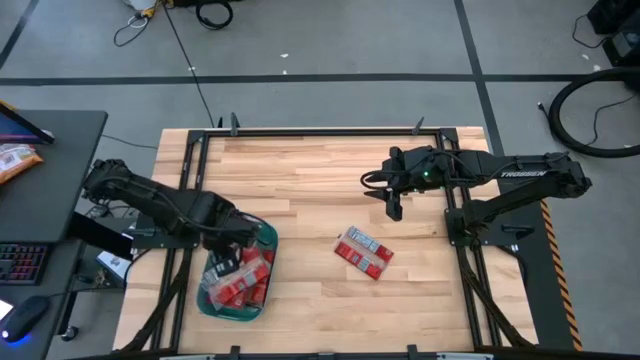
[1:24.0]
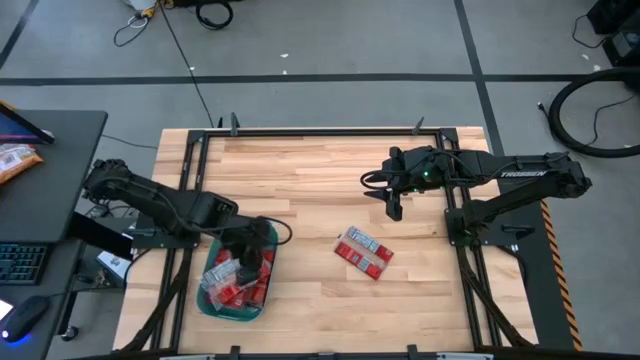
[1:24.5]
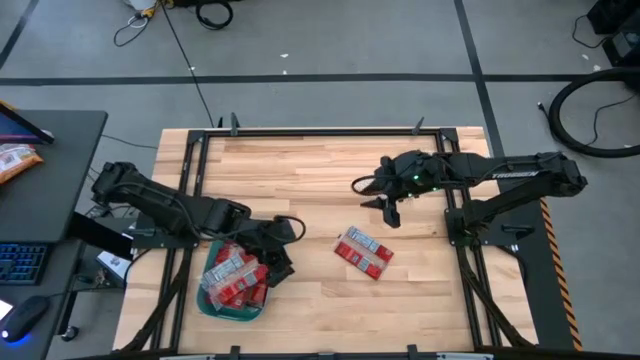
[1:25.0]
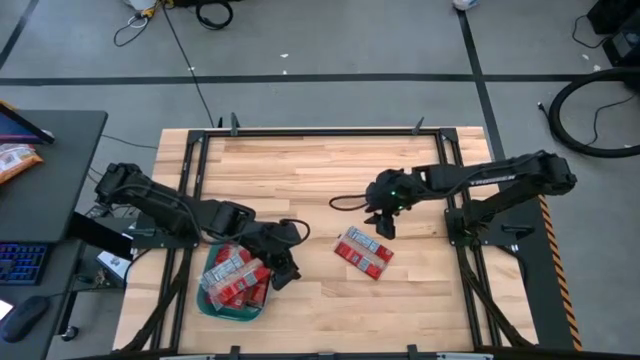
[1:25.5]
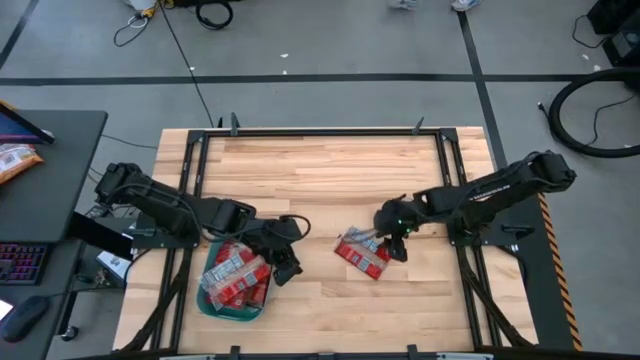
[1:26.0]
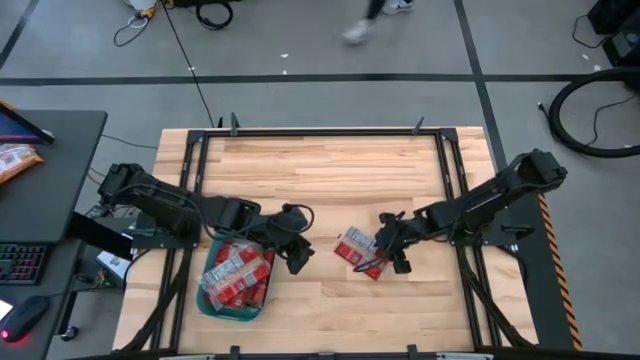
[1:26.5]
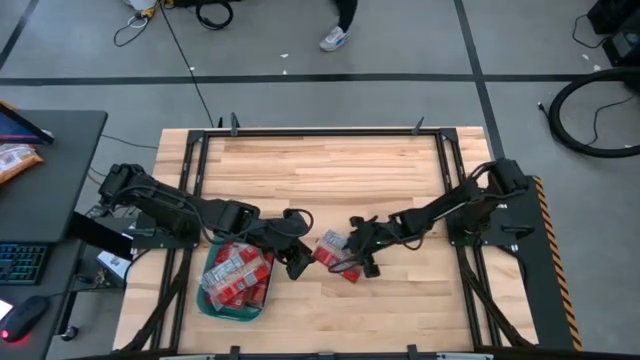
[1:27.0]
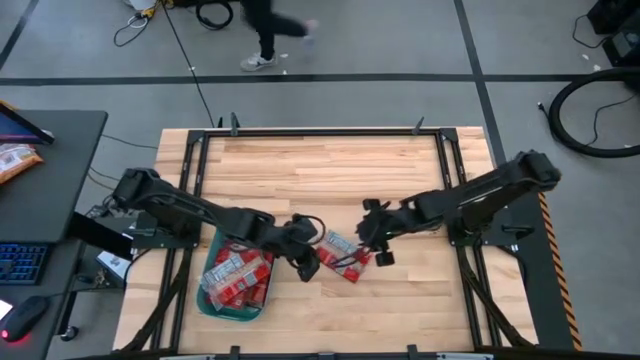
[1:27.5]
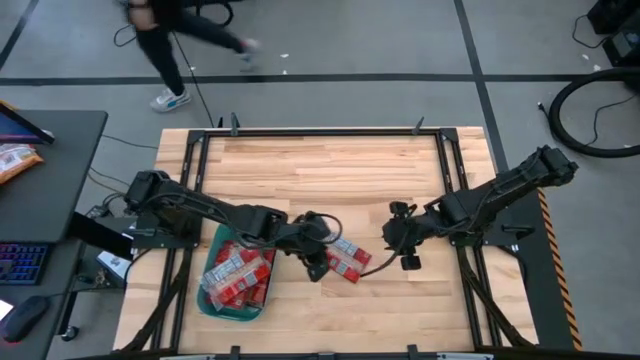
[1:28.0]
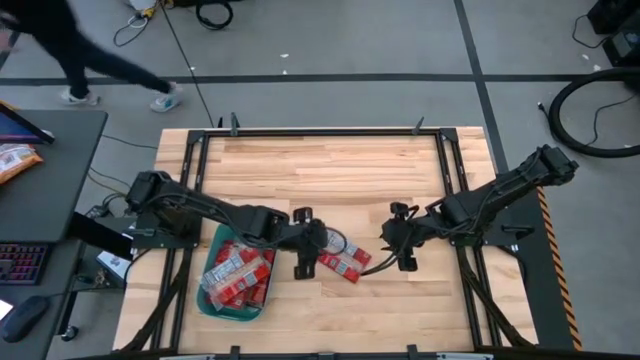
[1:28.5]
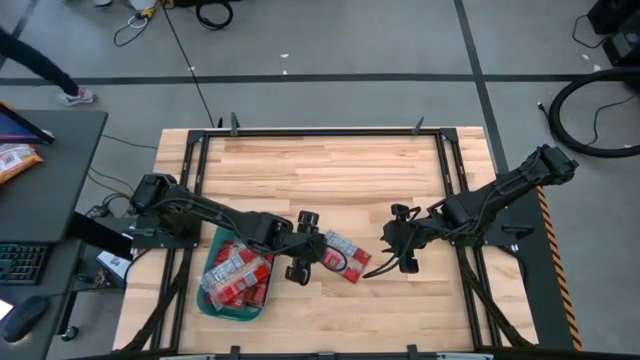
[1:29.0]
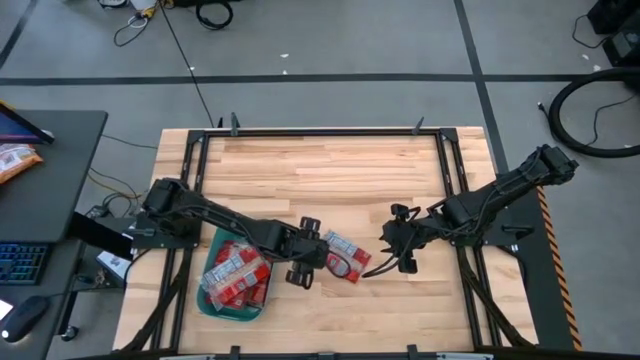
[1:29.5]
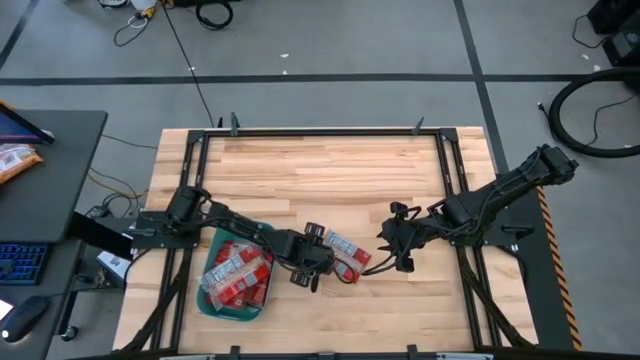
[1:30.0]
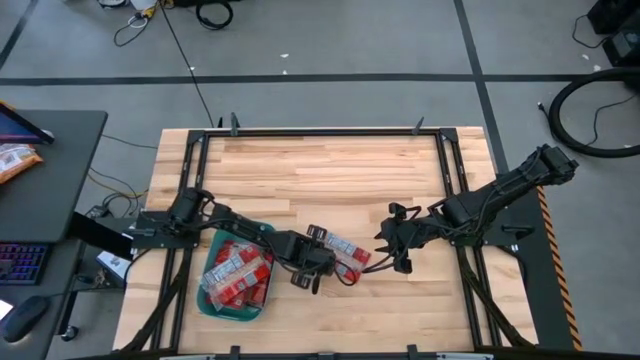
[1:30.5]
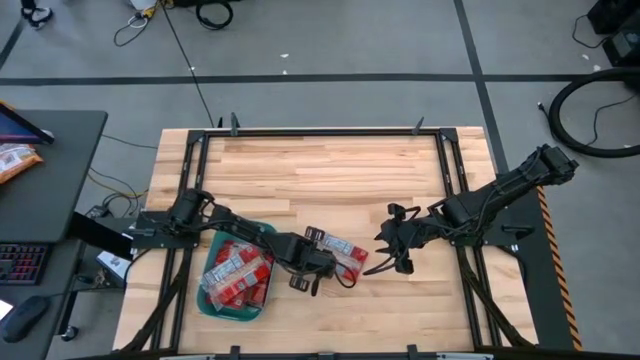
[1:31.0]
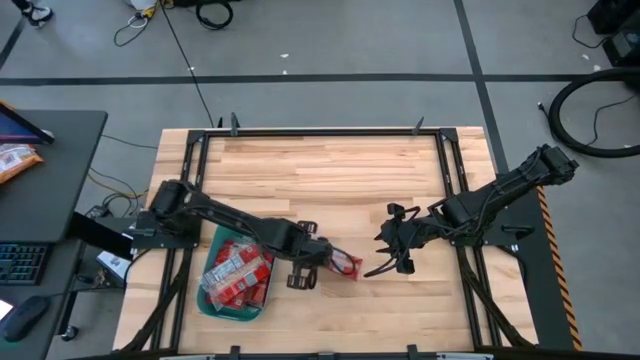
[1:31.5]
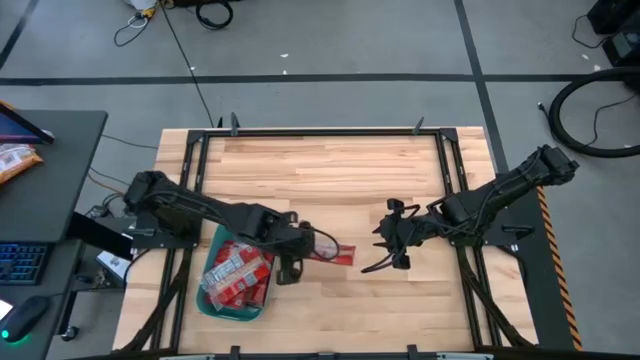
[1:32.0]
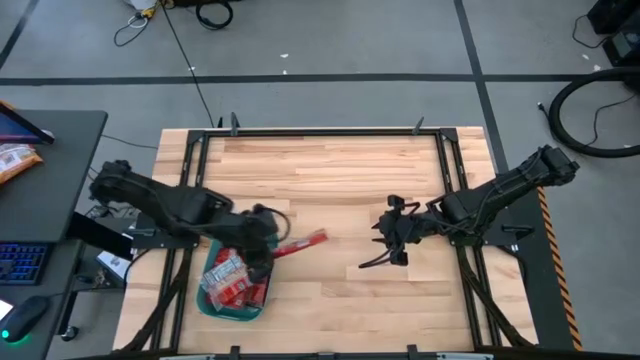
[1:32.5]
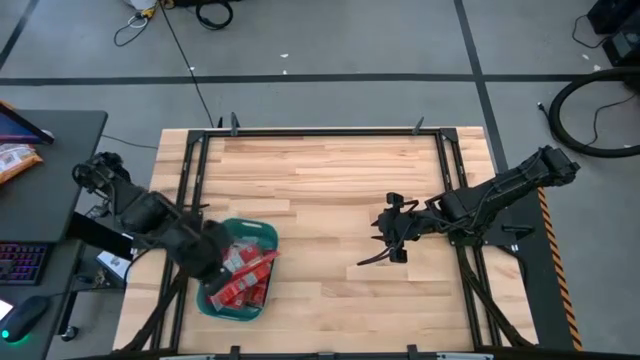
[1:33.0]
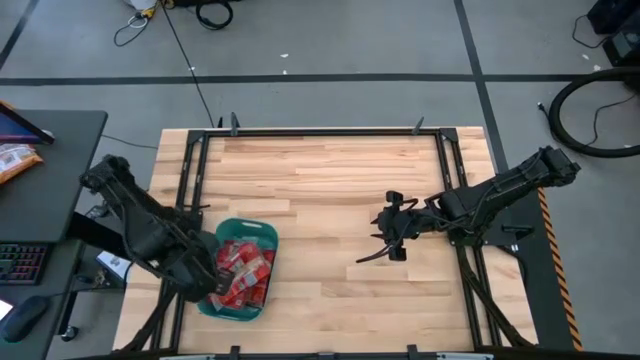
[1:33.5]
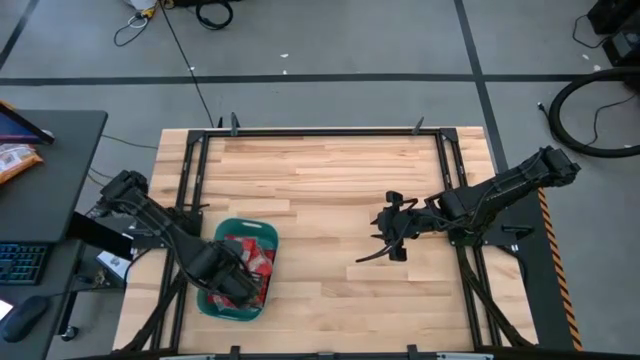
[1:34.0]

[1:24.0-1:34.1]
Task: Sort popcorn bags into baskets
Put the red popcorn bag into the green bin

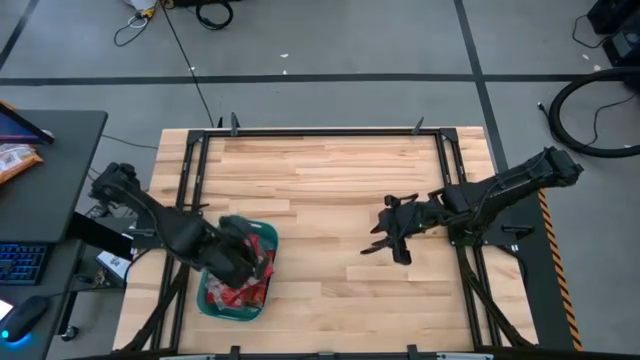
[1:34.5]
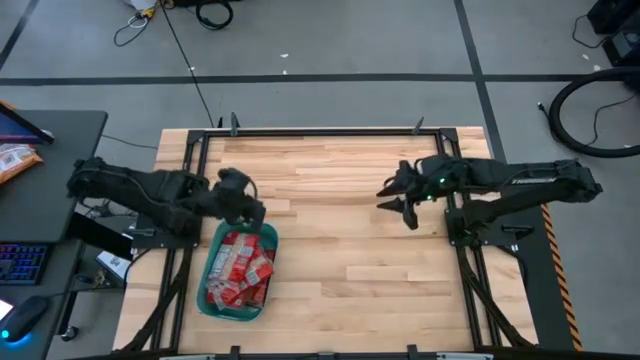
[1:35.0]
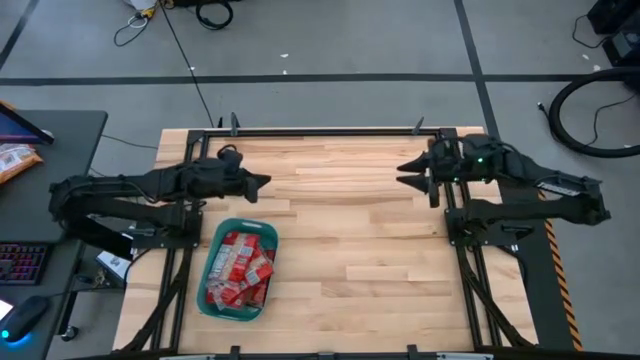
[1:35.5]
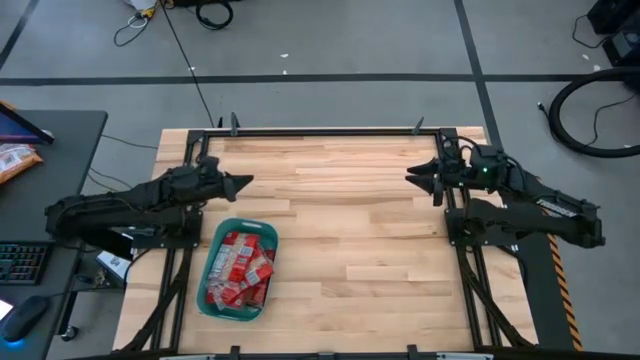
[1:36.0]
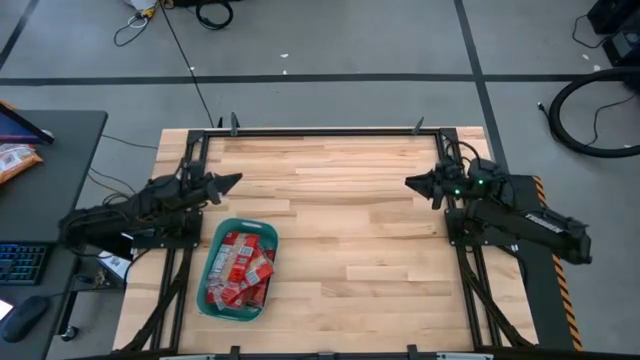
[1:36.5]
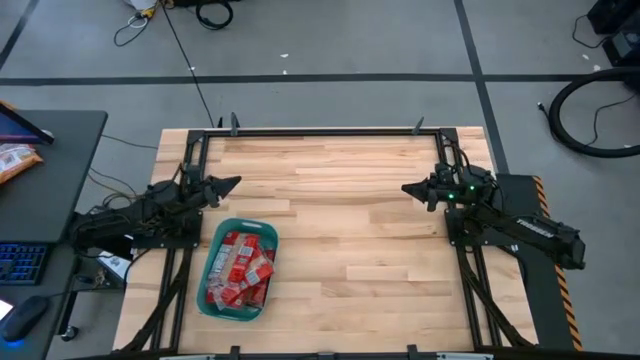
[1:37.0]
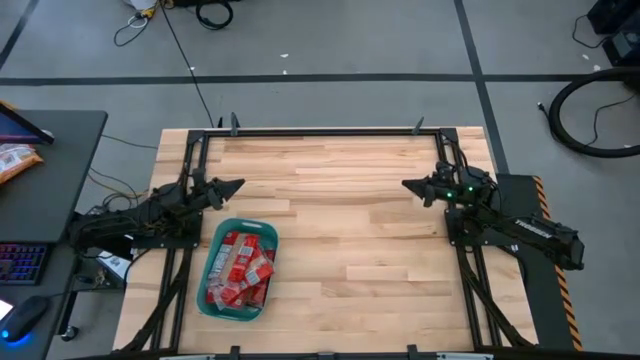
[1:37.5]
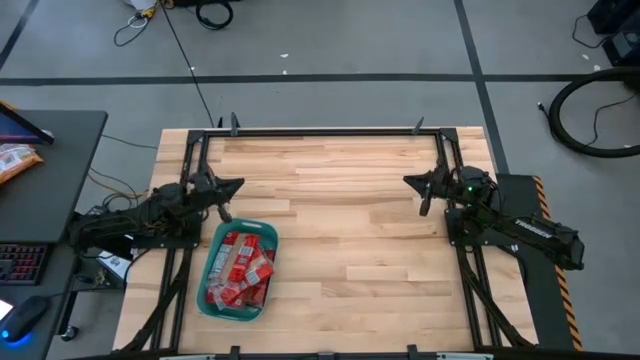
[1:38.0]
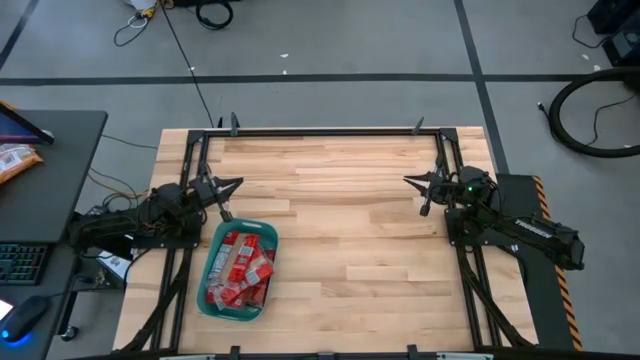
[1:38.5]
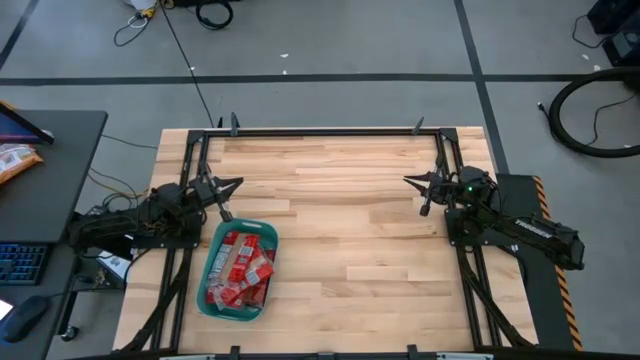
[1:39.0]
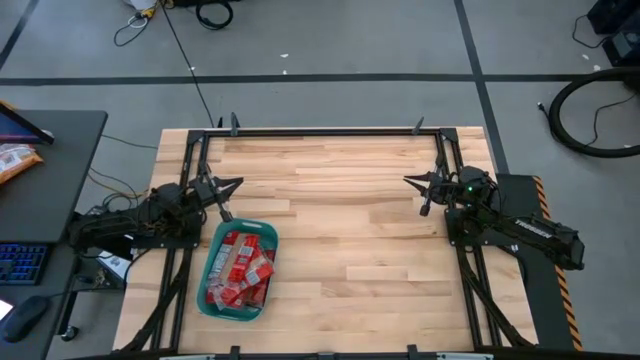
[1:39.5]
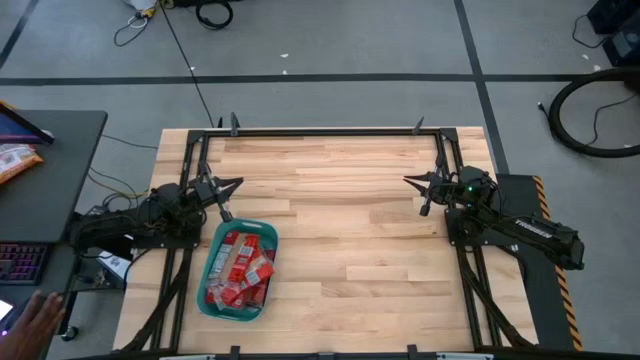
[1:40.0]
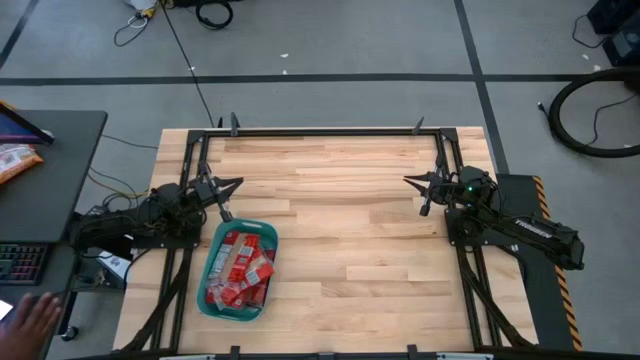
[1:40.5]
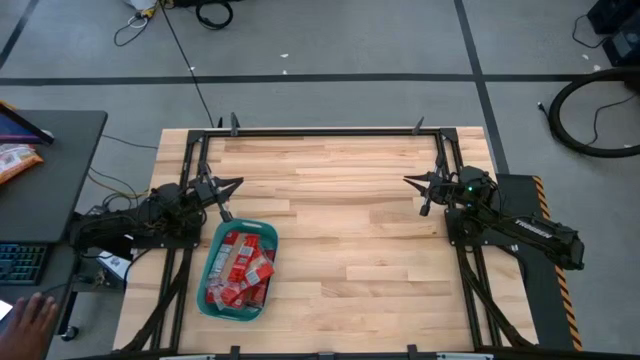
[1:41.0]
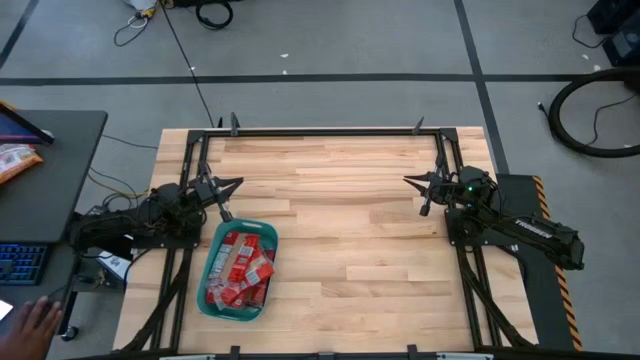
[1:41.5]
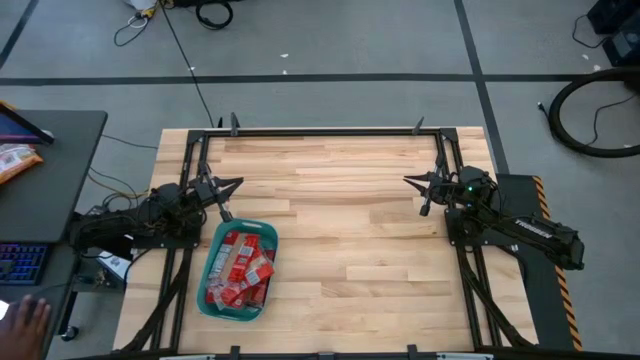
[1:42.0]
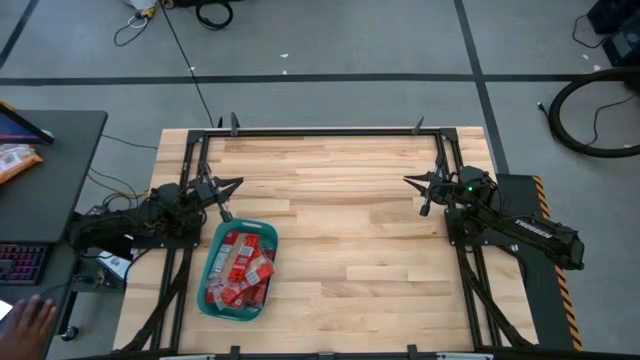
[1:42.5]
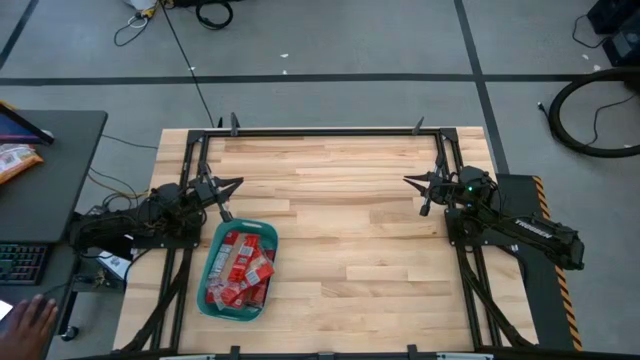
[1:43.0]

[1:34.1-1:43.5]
Return to Home Position
